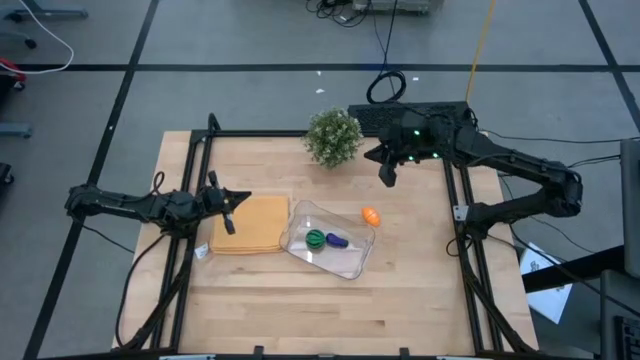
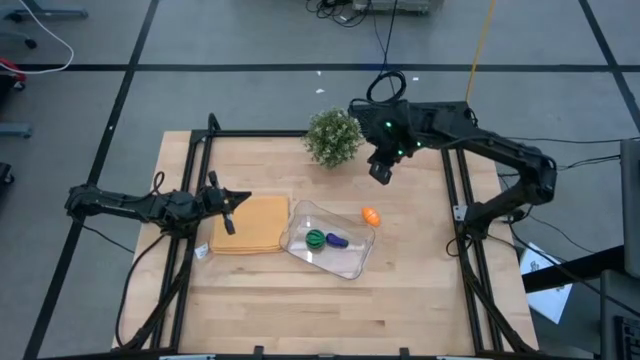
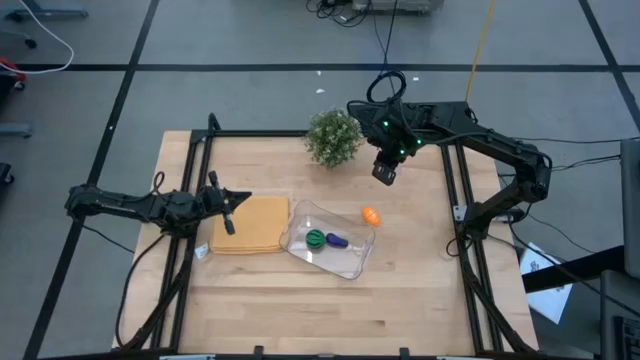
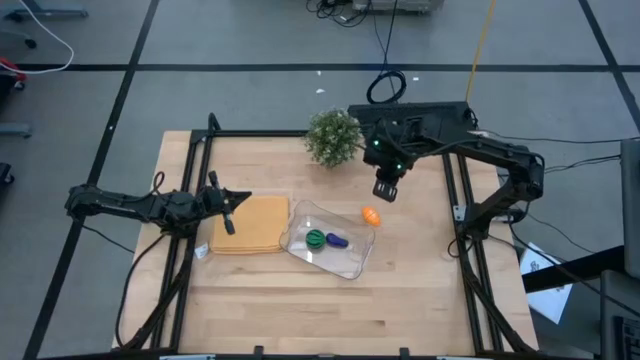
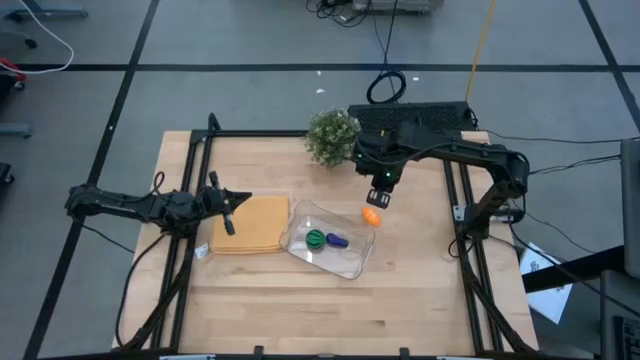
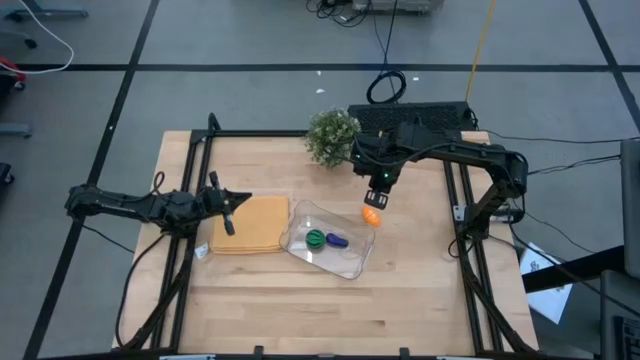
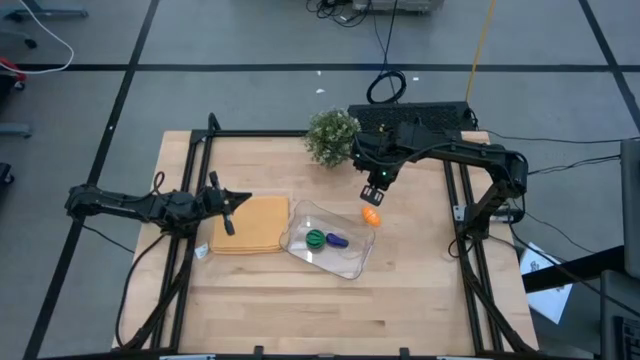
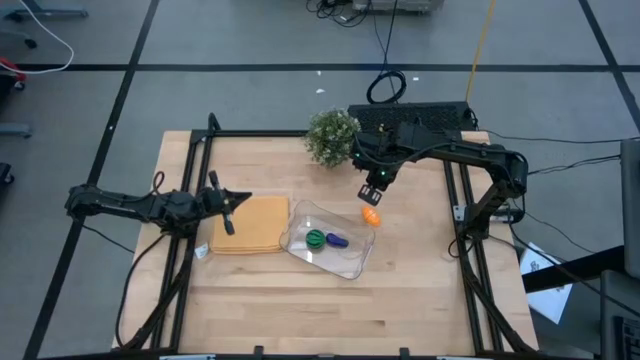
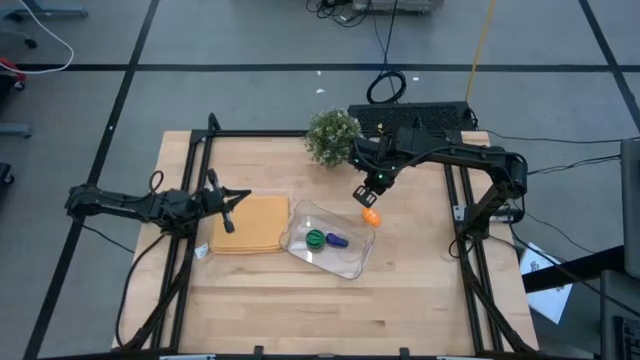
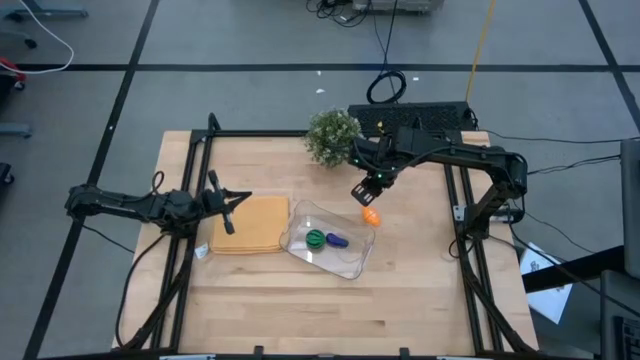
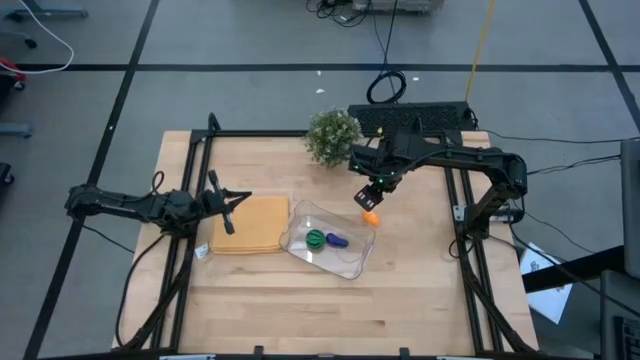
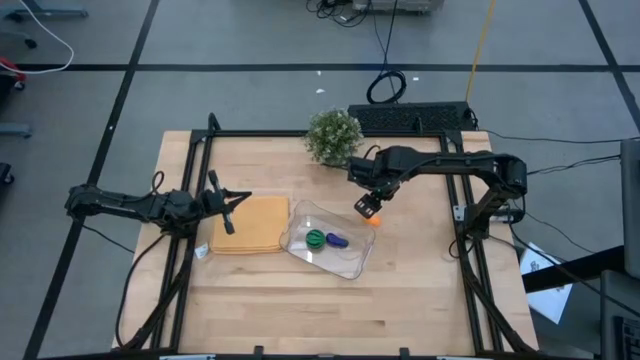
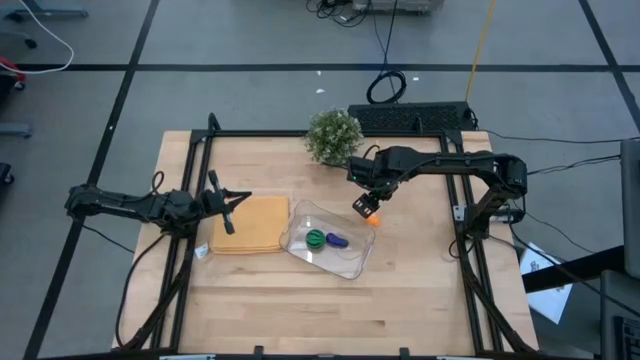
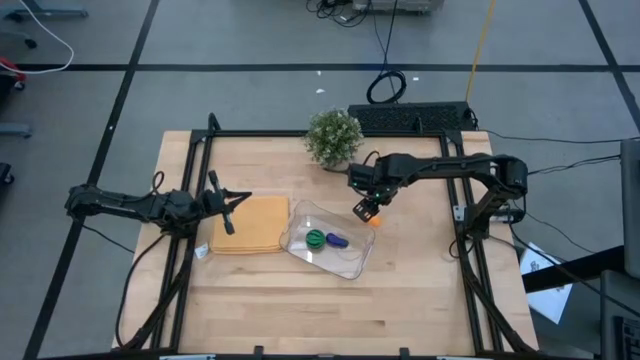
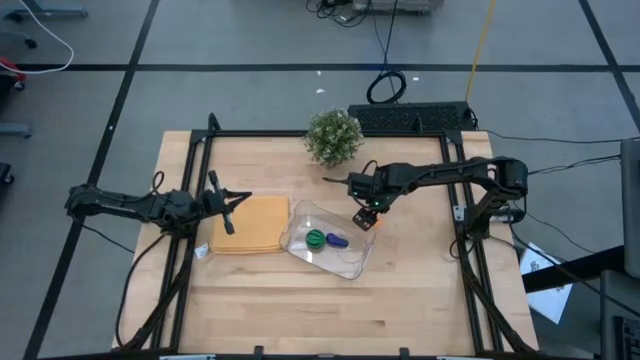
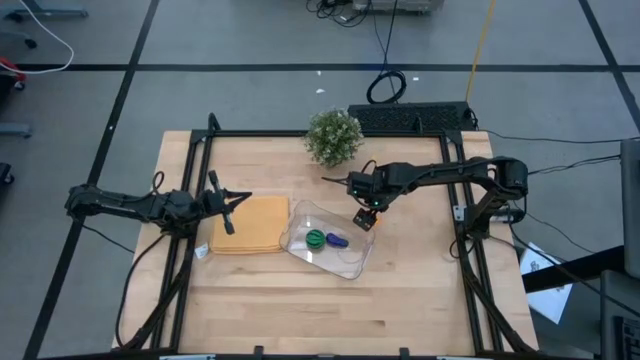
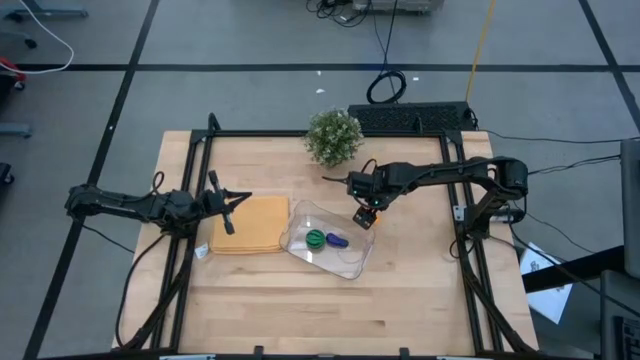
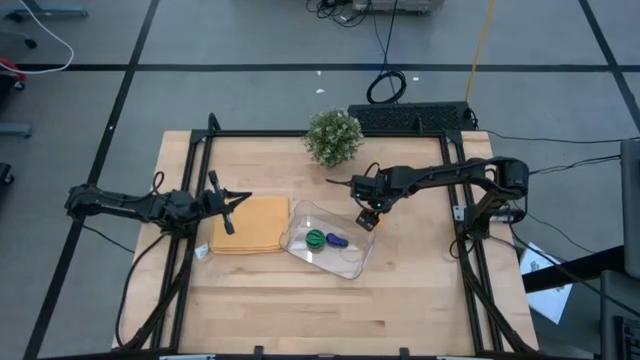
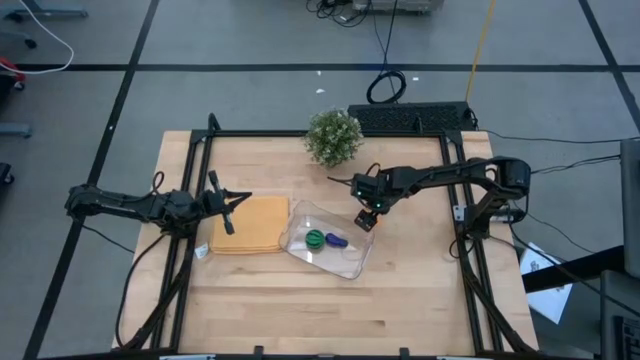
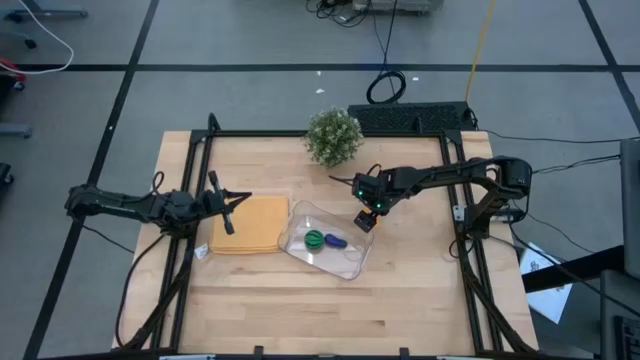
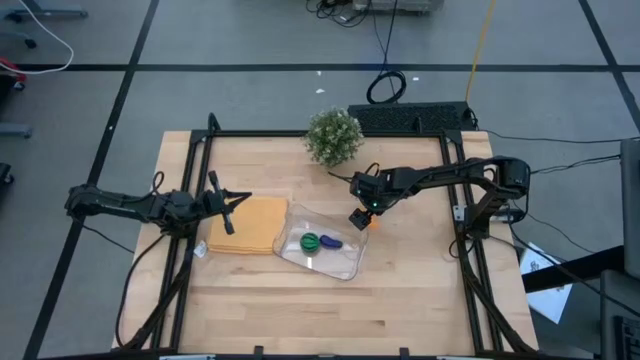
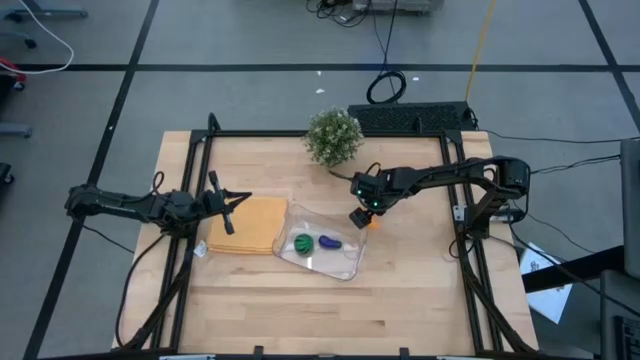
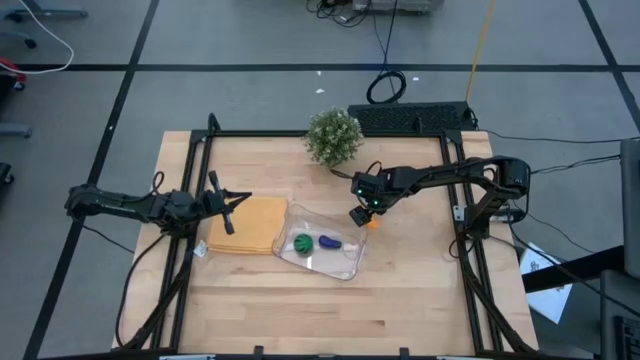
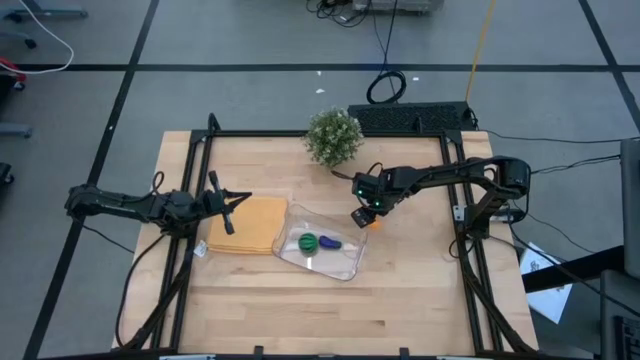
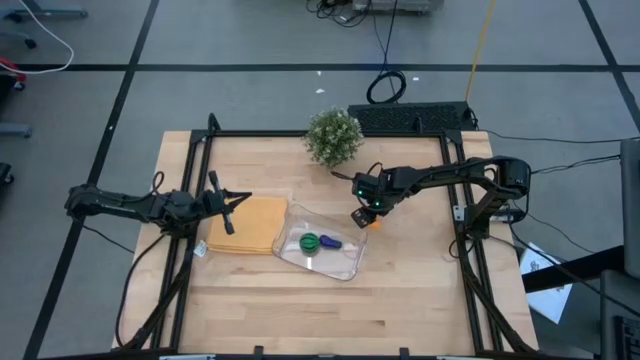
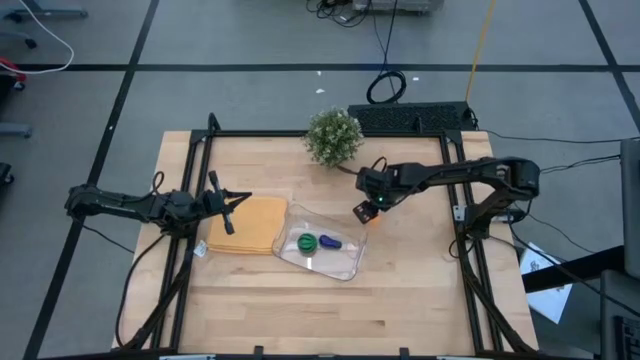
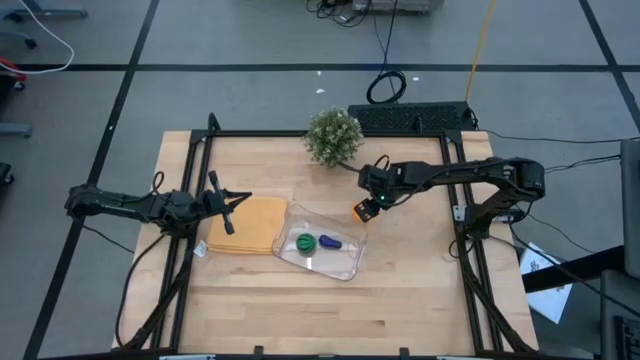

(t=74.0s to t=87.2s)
Task: Pick and placing Produce into tupperware
Put the bread into the transparent bin

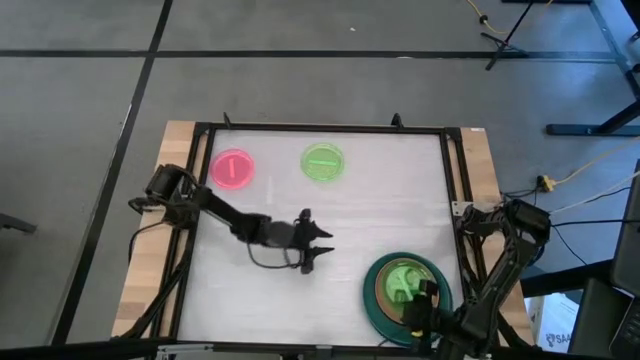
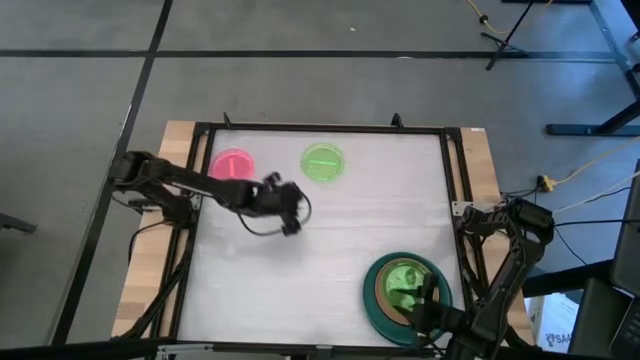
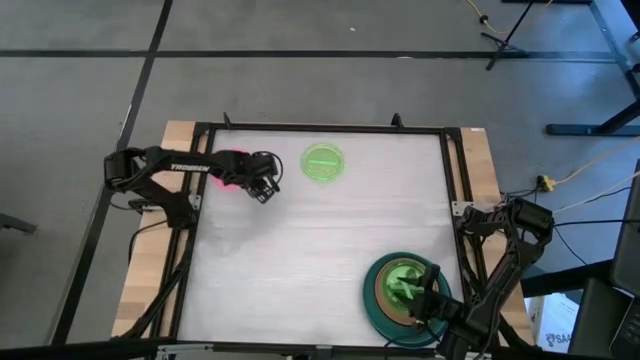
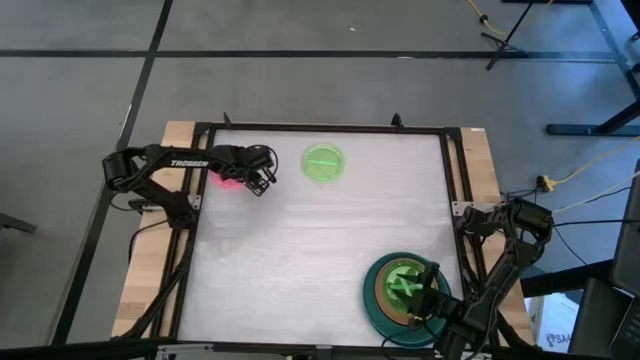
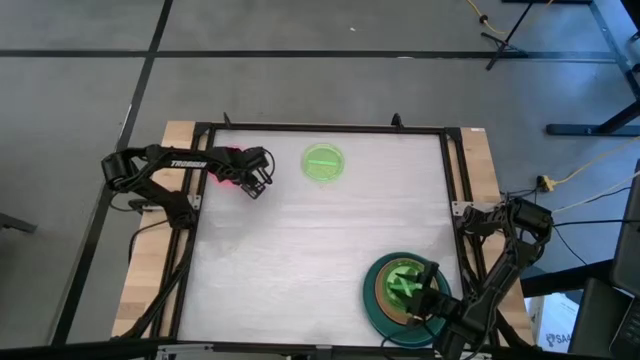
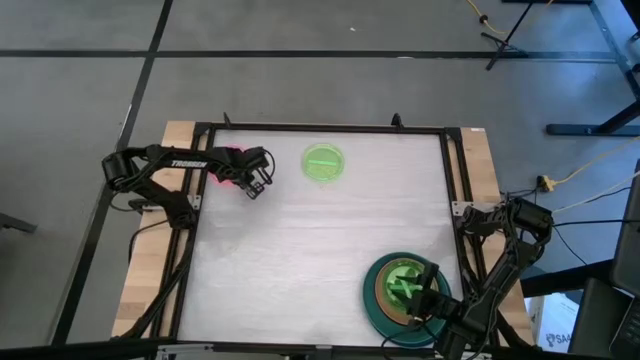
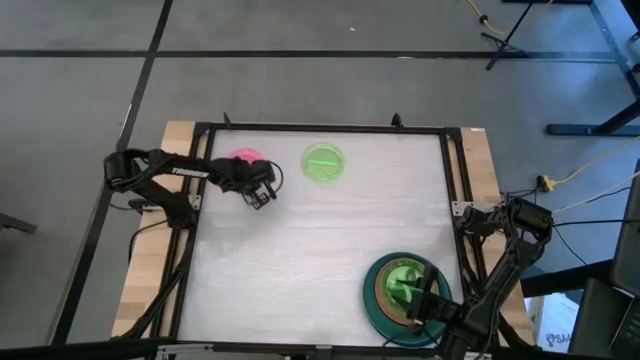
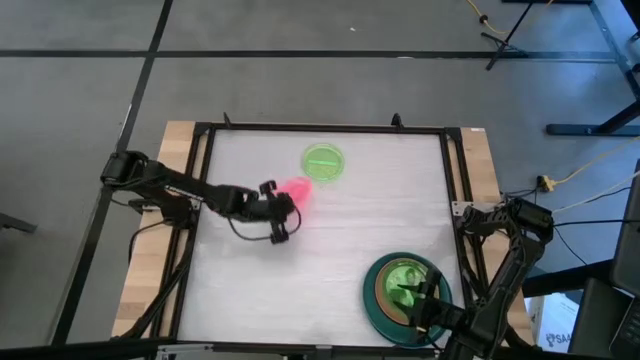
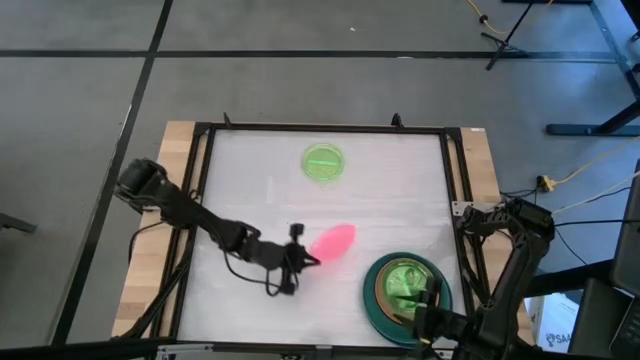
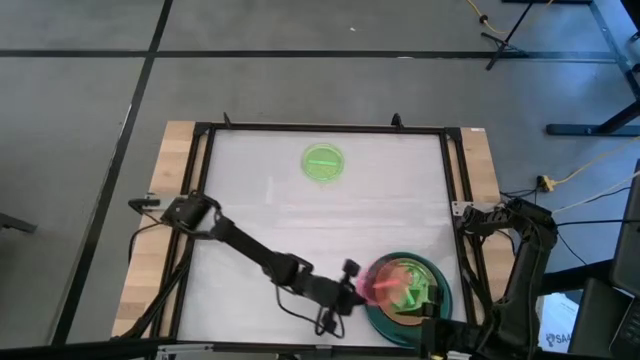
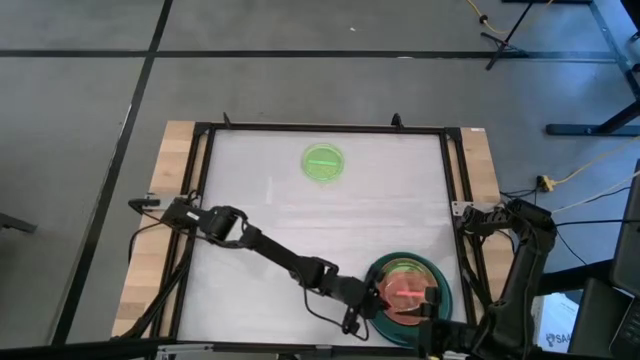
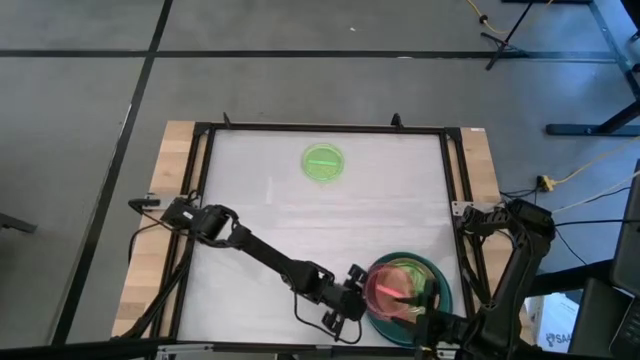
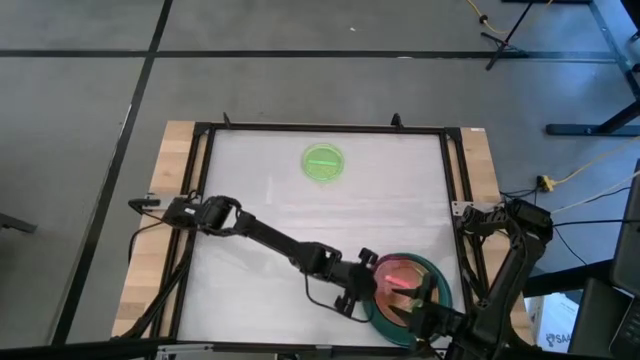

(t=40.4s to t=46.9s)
Task: Stack plastic plates
Stack the pink plate on top of the green plate
